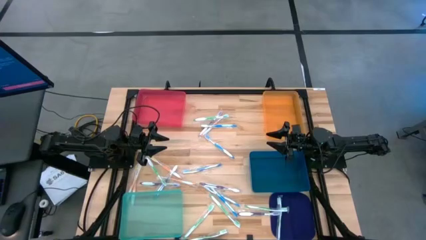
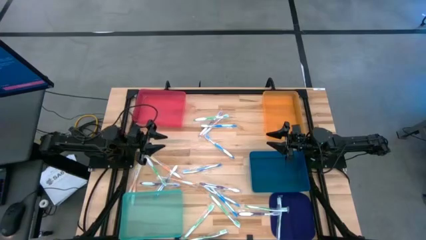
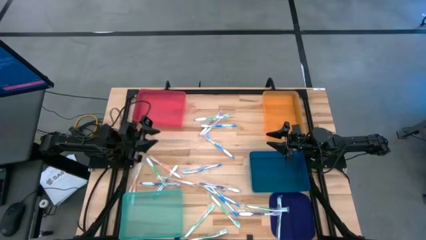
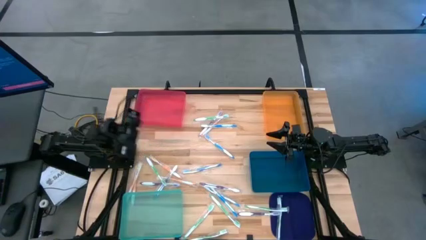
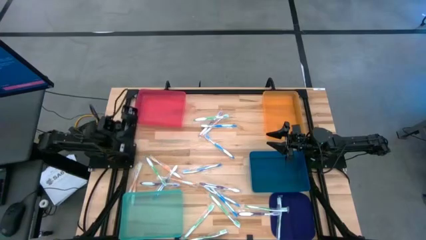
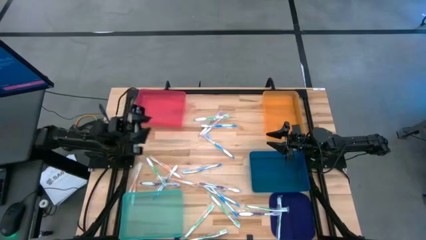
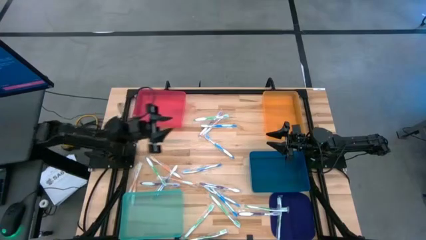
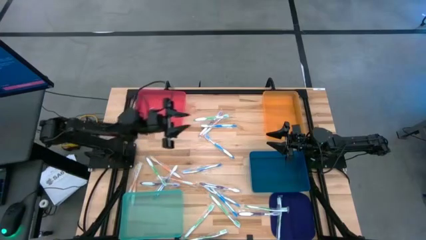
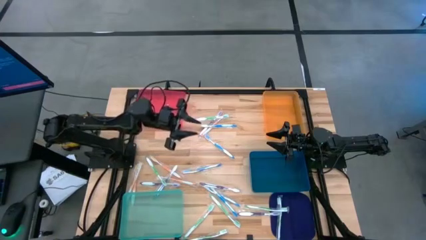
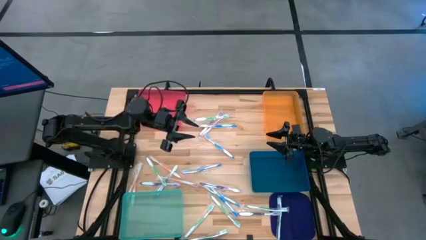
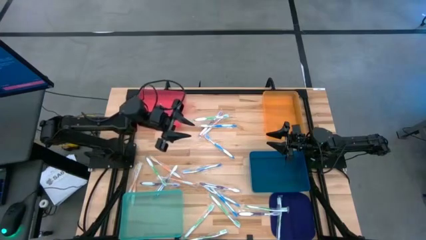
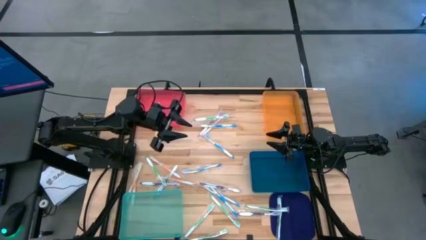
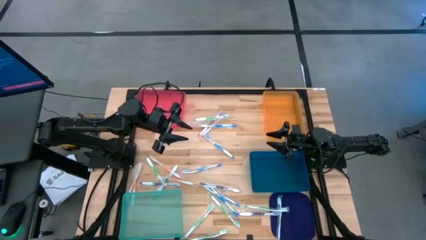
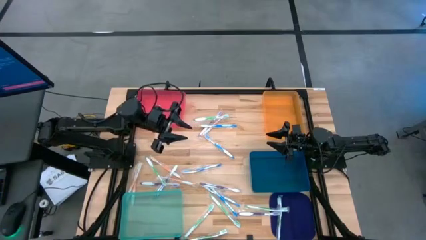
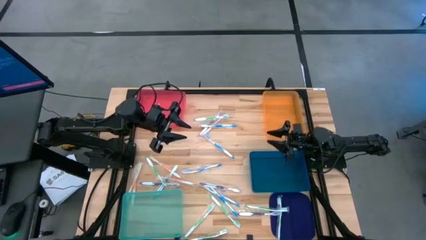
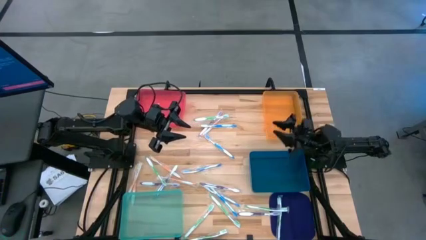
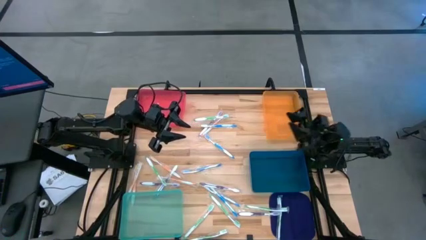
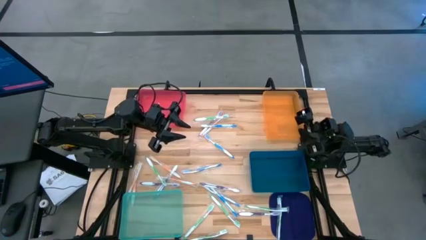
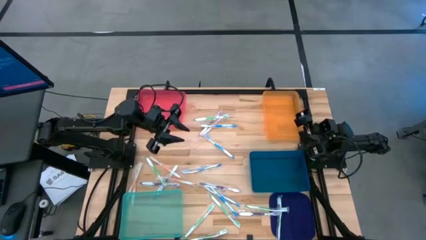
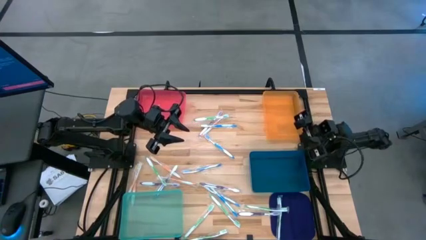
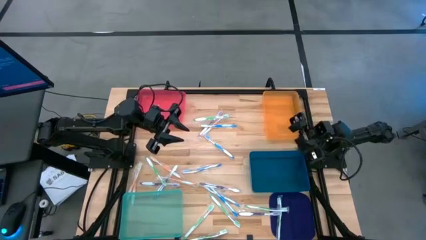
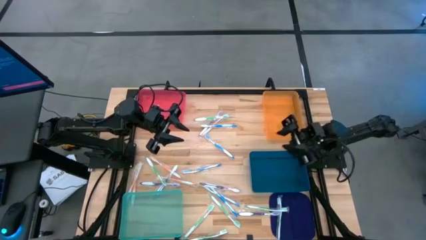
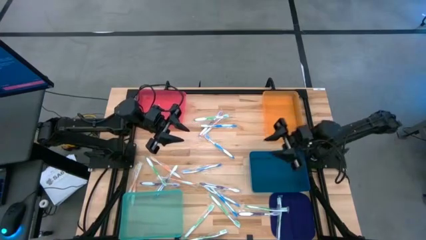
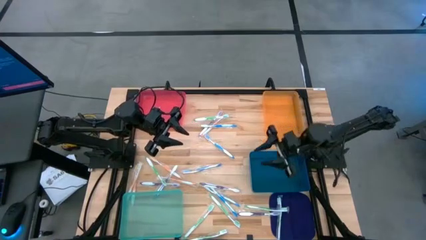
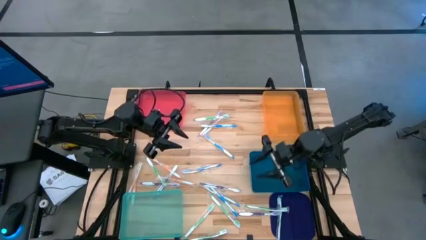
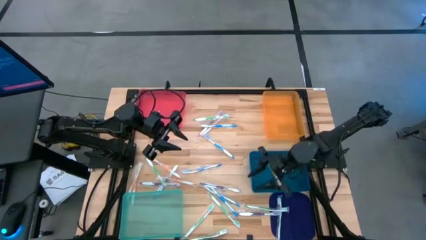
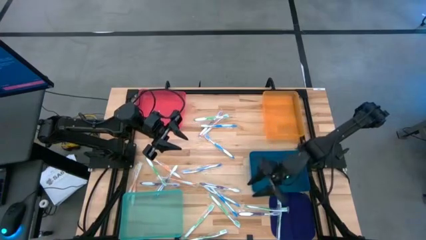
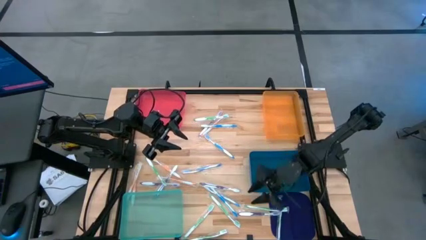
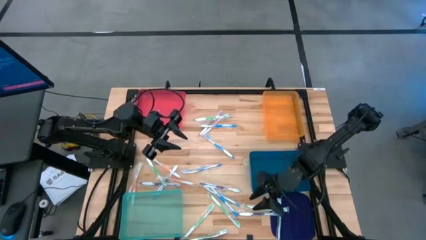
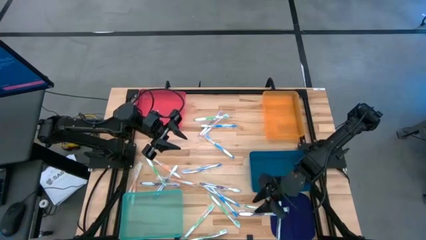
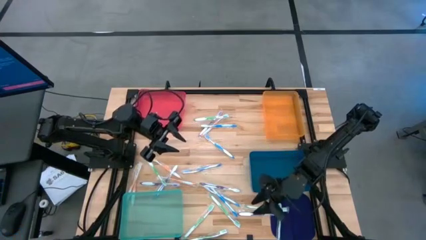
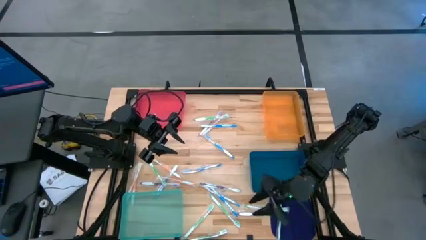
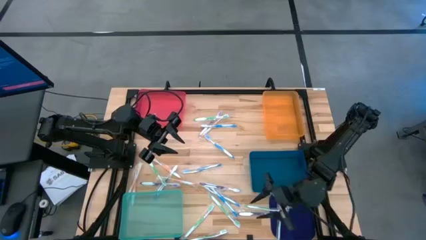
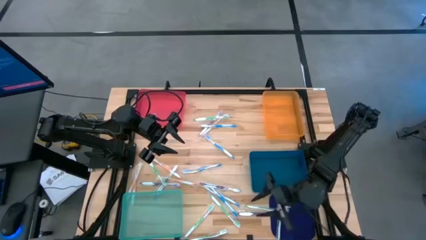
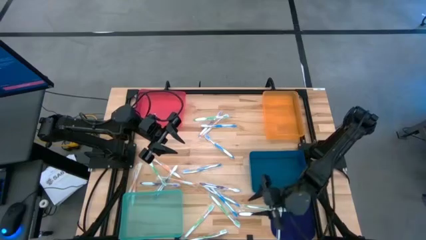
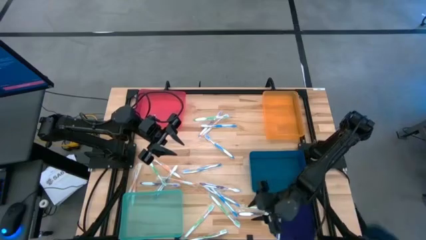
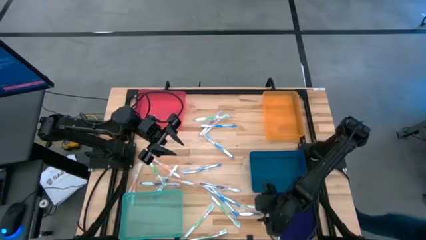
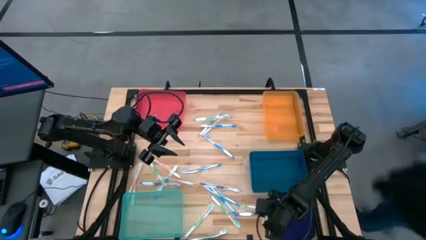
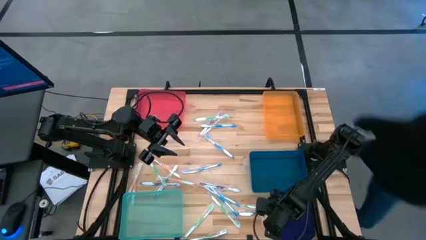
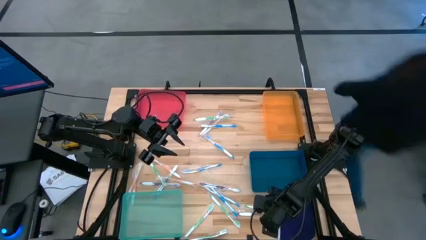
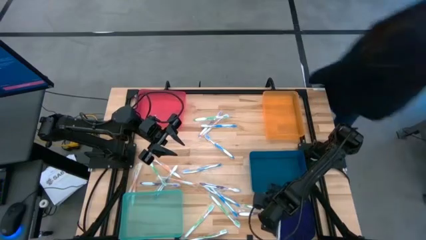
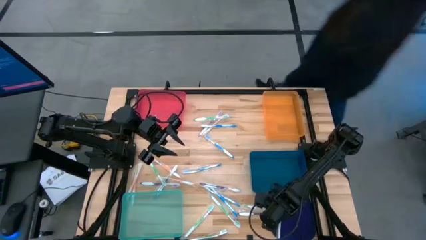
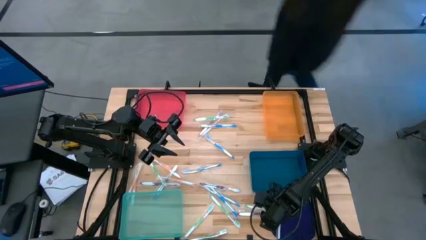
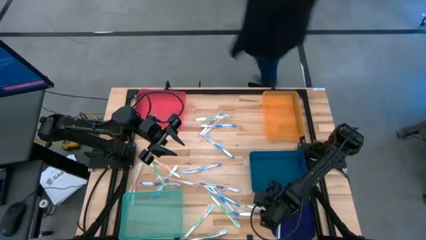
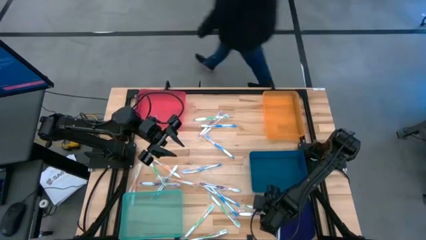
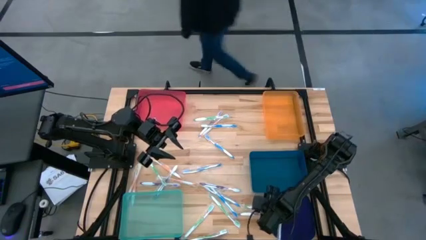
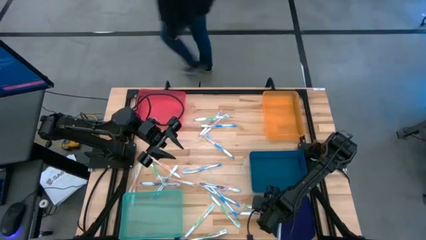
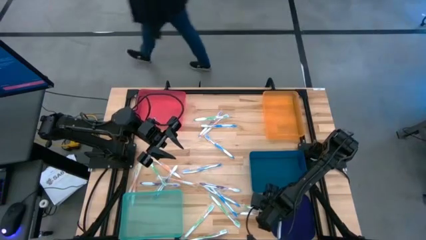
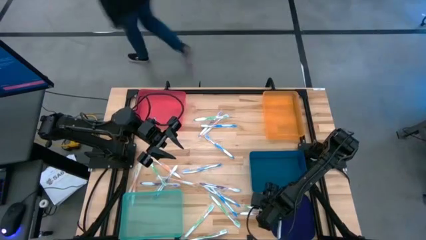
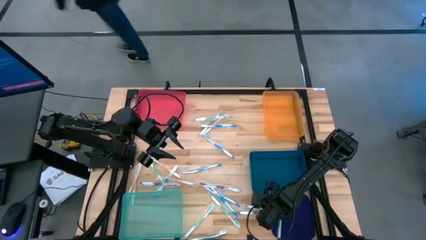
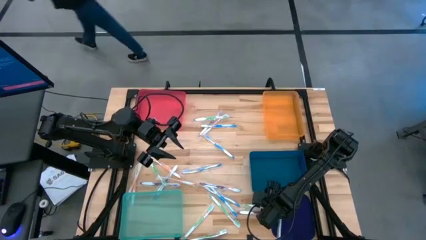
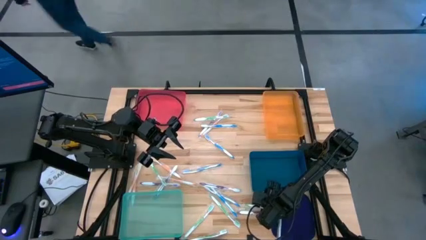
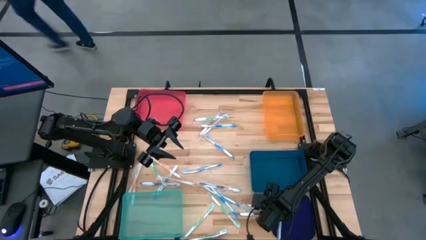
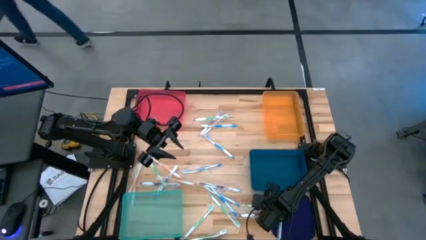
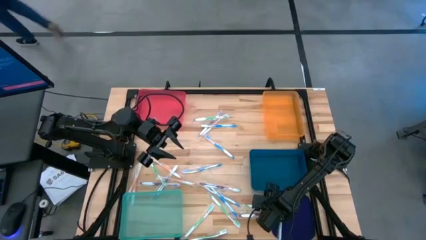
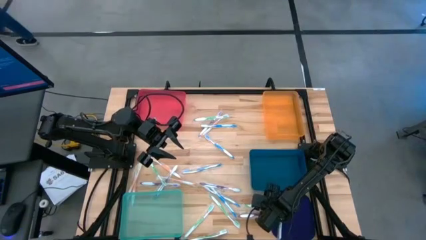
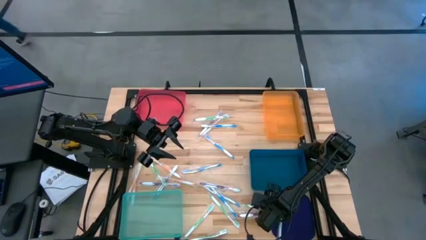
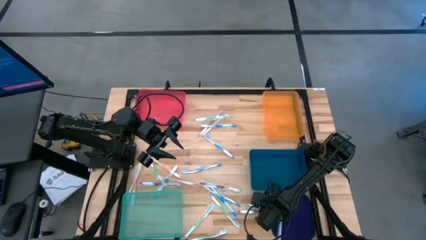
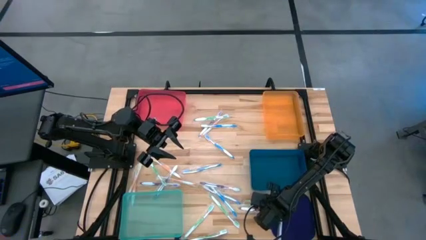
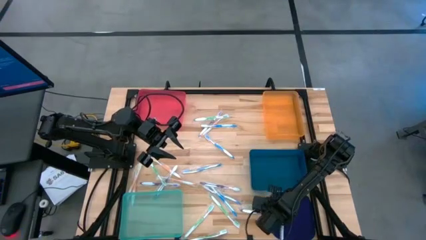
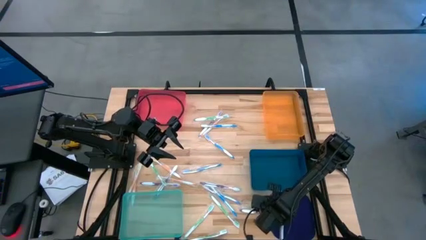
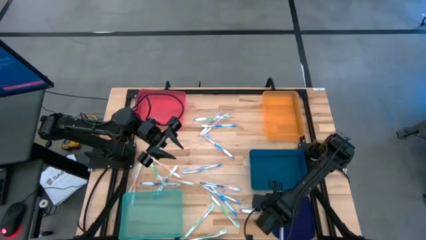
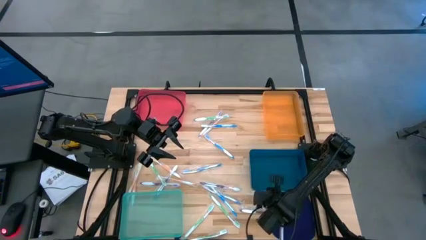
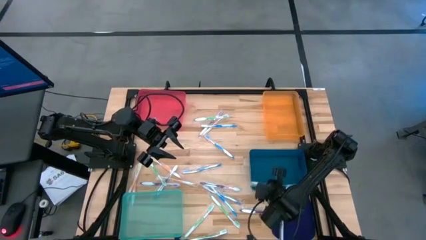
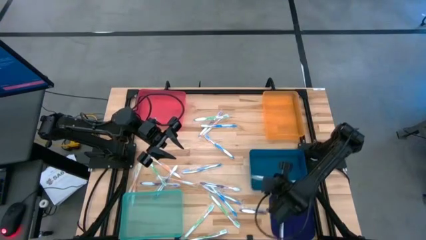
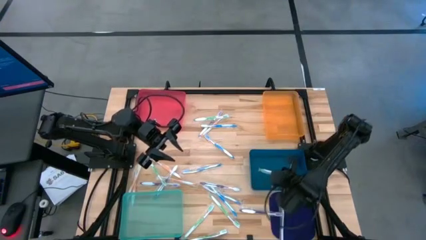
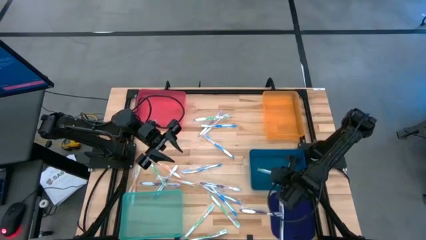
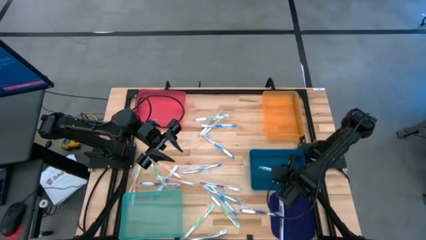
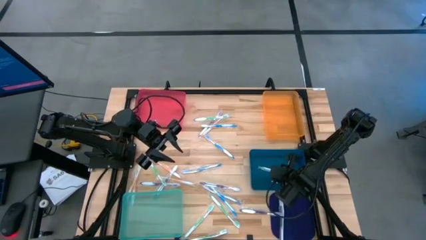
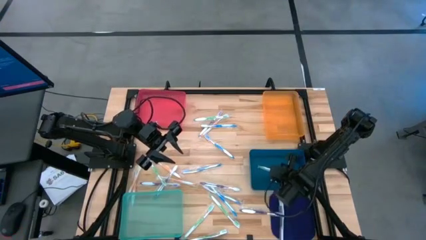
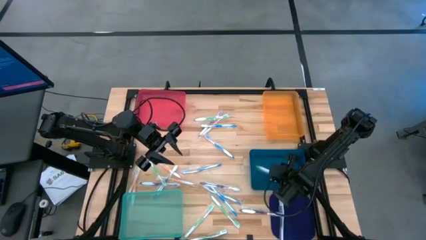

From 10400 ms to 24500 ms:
Task: Pick & Place Toothbrushes
Put the green toothbrush into the blue bin
